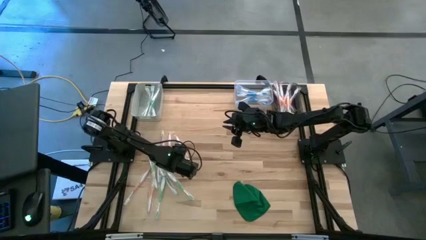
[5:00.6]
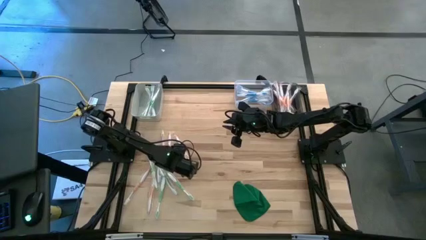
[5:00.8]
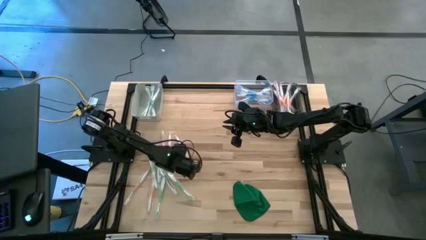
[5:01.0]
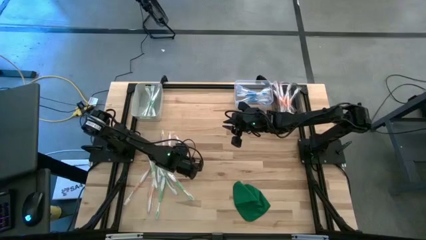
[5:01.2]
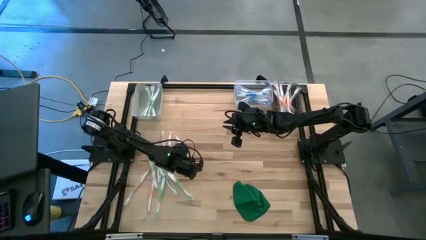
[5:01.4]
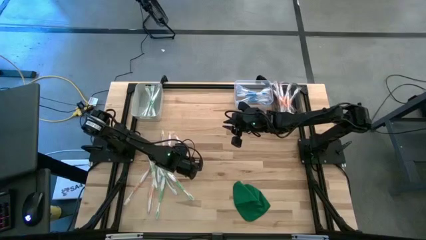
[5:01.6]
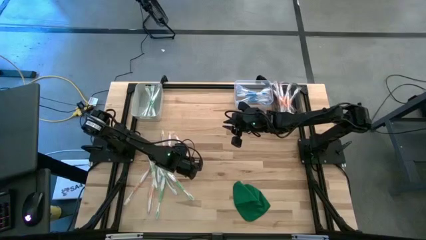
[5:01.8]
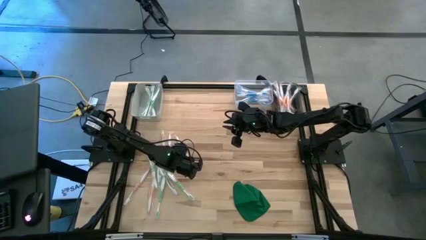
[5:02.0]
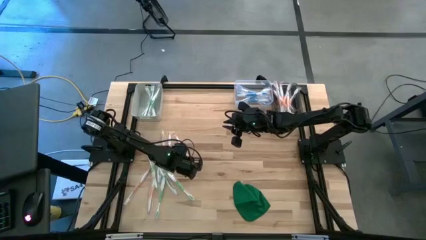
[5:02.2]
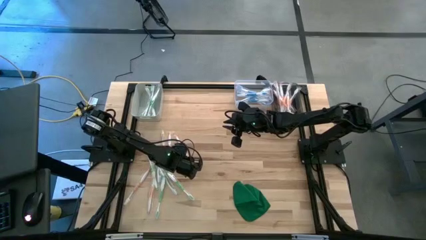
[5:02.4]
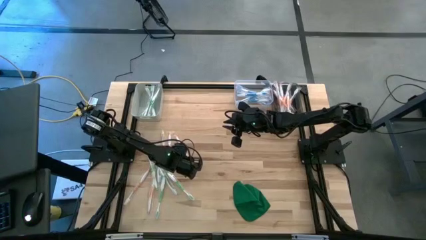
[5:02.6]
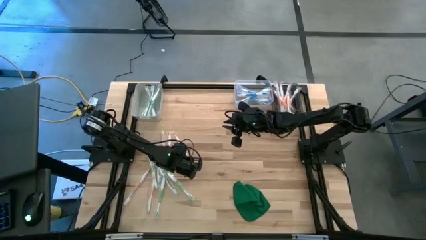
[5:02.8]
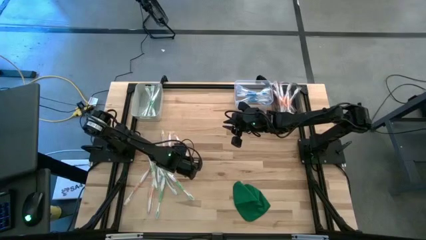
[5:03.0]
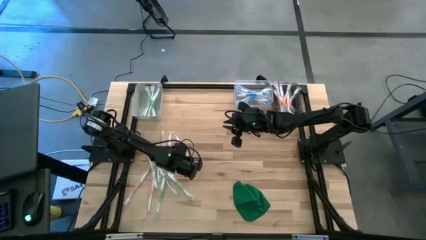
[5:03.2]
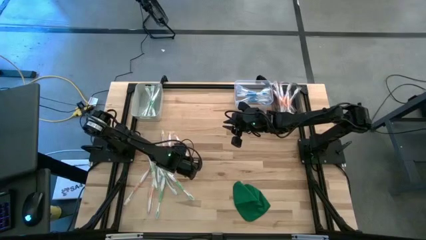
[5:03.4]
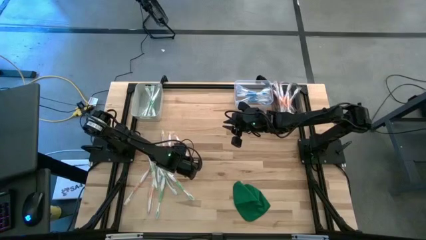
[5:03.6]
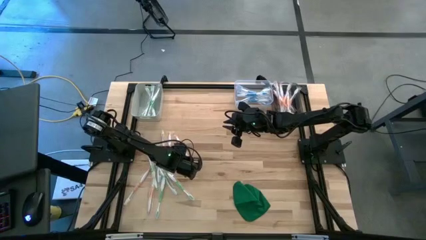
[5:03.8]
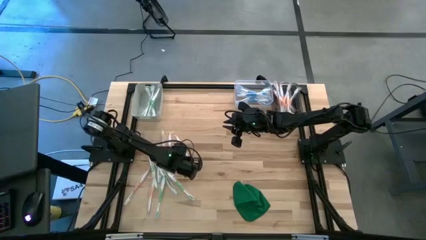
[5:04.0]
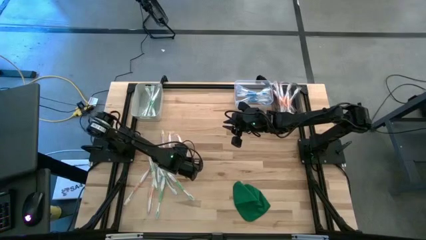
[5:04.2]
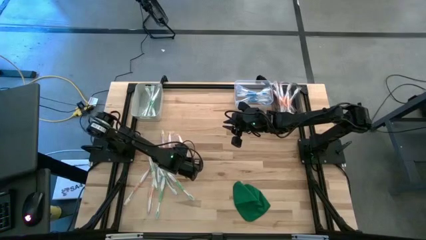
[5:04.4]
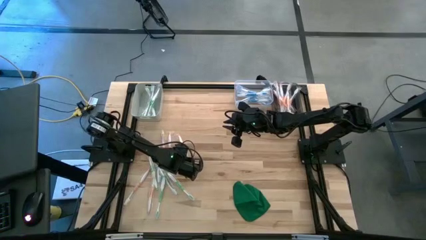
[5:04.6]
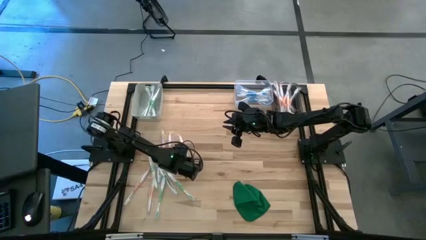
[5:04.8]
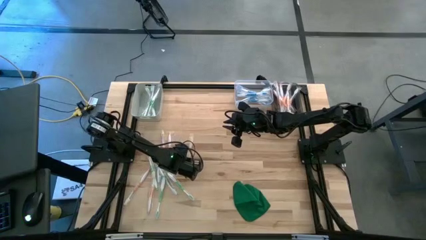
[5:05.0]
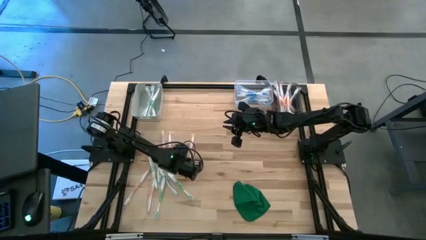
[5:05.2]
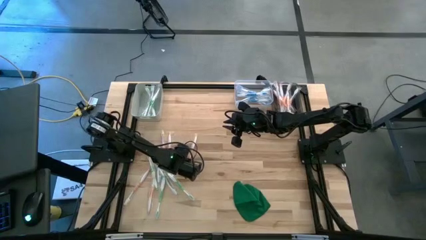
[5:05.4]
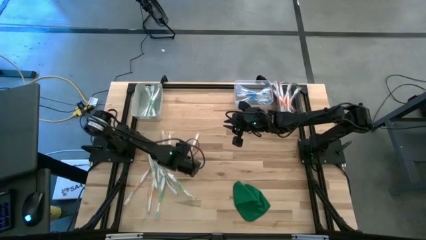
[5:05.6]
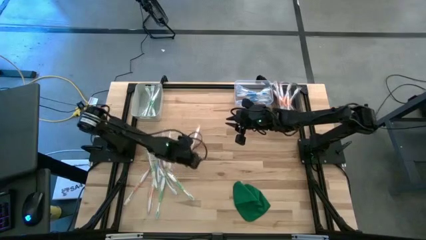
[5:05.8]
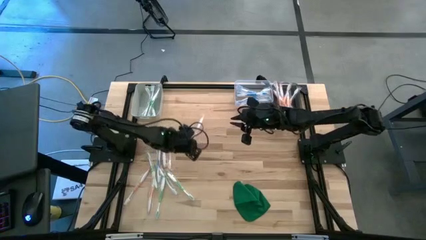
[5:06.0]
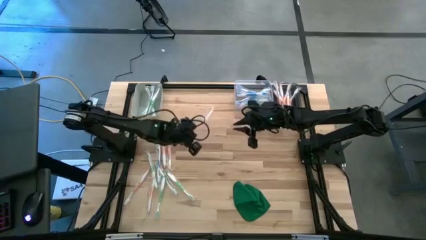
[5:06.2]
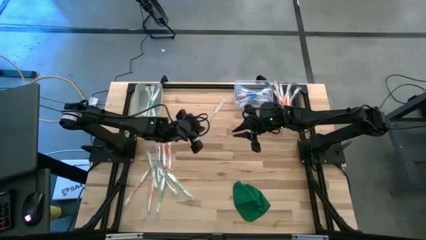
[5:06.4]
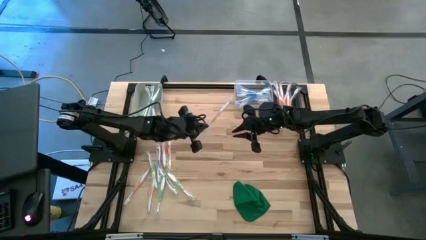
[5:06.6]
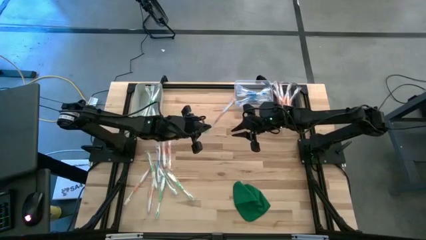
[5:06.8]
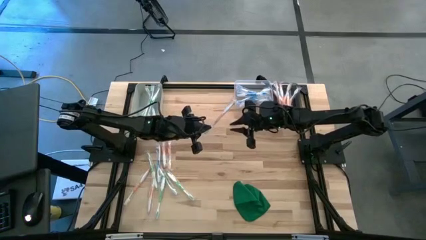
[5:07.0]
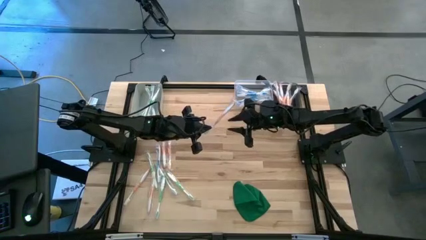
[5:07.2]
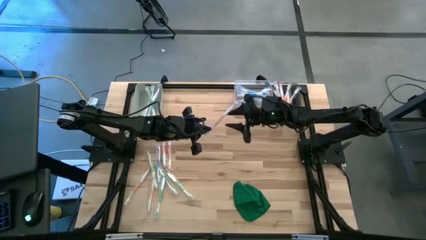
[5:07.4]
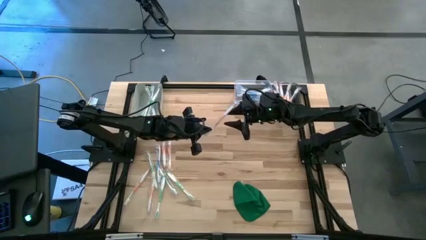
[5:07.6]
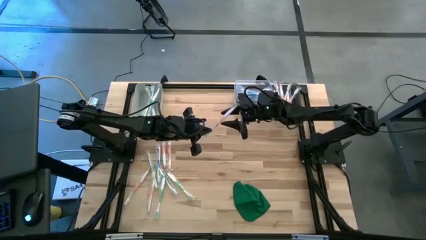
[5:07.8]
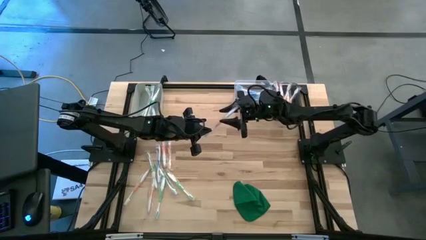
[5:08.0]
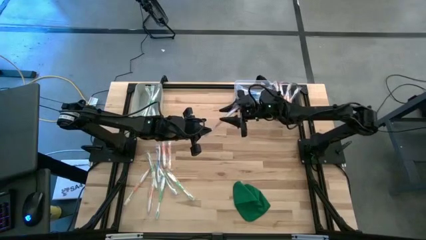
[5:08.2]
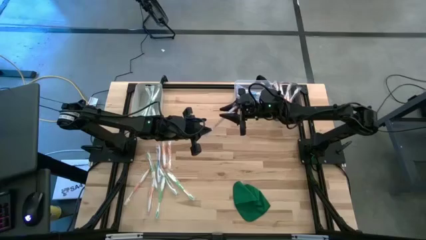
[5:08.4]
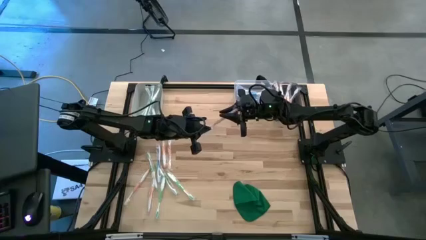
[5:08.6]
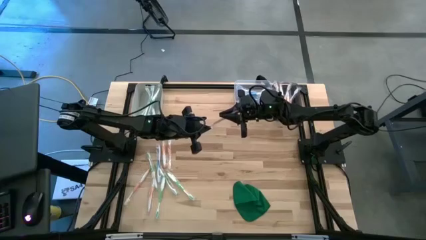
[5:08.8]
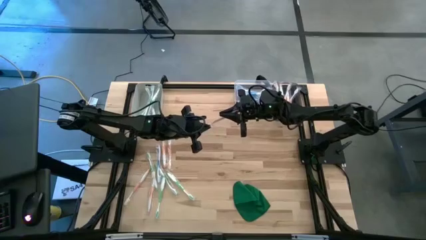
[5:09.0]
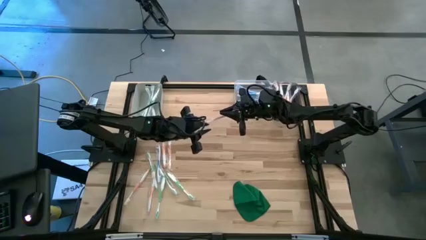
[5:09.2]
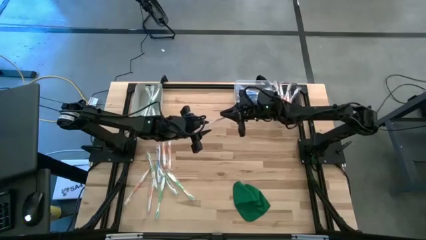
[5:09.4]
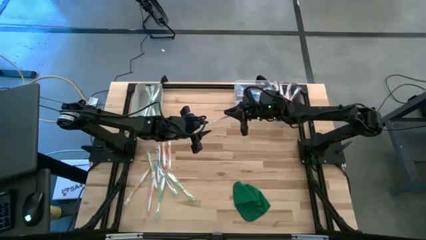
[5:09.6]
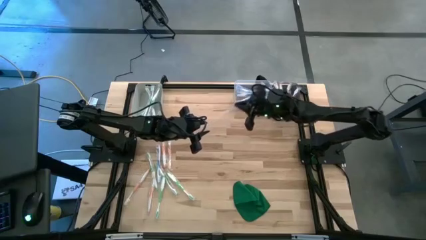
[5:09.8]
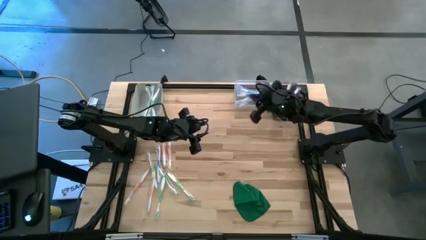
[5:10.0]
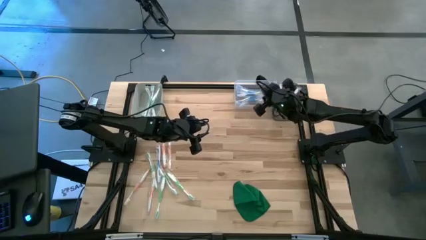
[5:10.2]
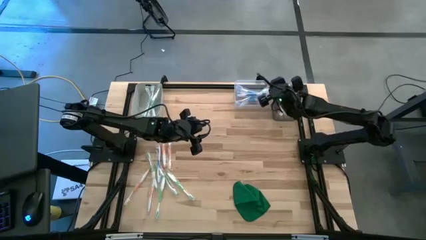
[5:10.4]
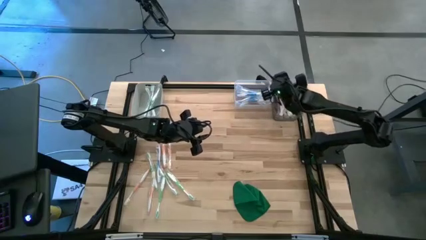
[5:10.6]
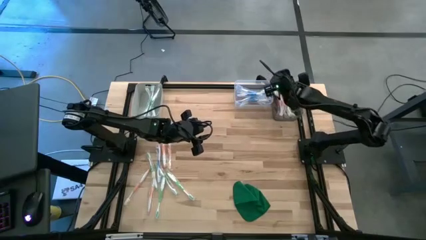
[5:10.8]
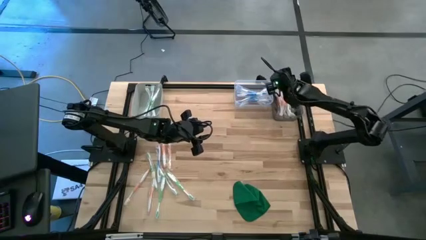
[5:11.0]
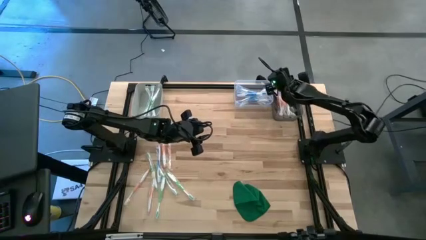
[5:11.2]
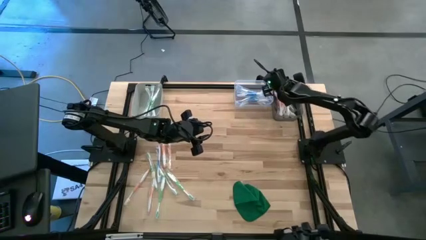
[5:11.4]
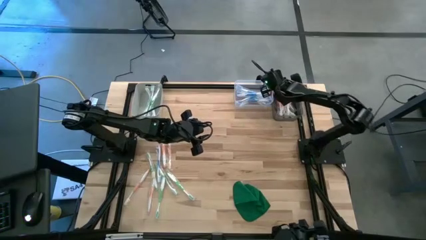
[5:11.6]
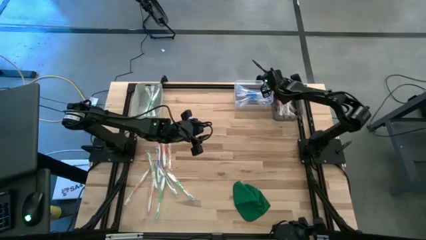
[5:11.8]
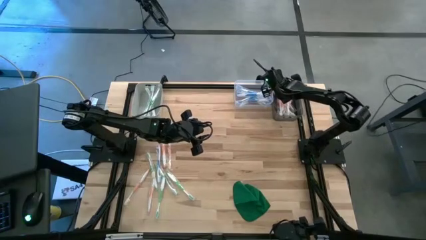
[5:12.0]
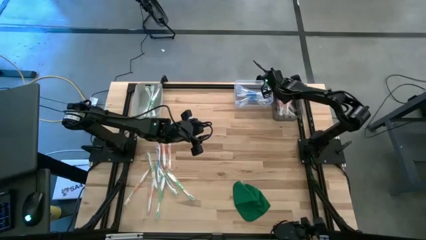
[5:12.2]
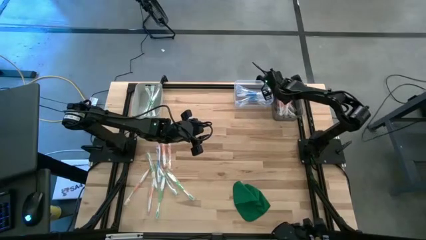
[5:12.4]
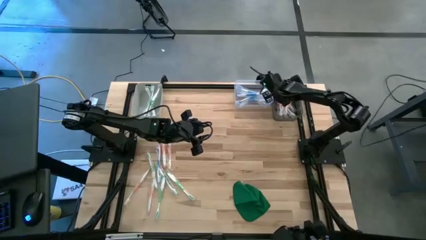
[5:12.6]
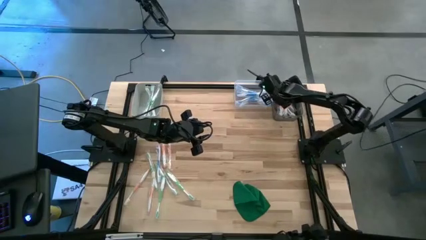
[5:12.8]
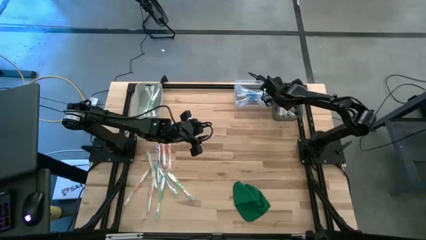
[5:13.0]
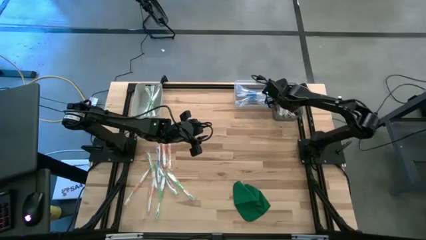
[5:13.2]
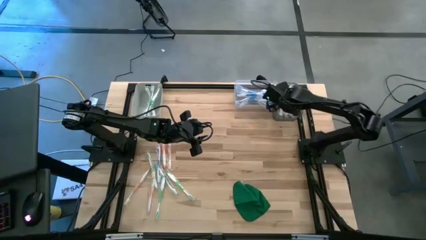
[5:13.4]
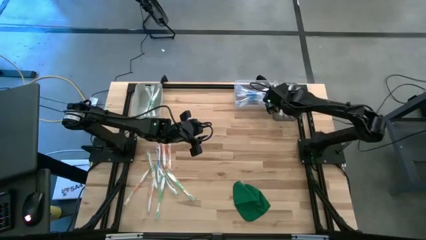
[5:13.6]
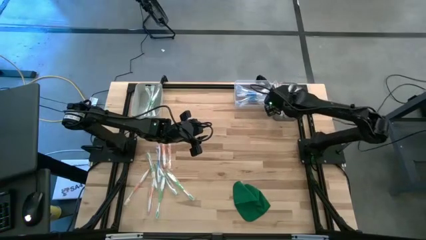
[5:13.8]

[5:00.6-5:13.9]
Task: Pick & Place Toothbrushes
Put the orange toothbrush into the black bin
